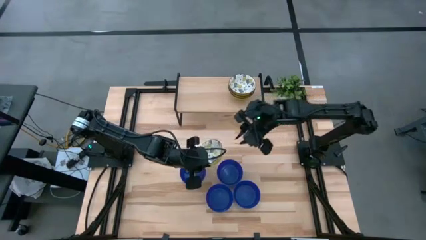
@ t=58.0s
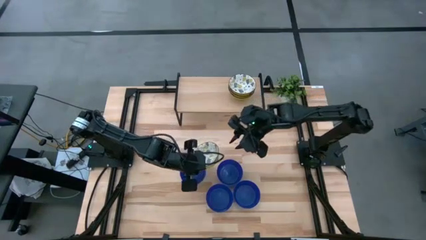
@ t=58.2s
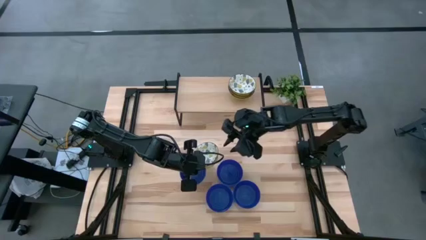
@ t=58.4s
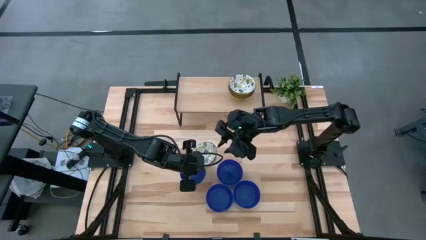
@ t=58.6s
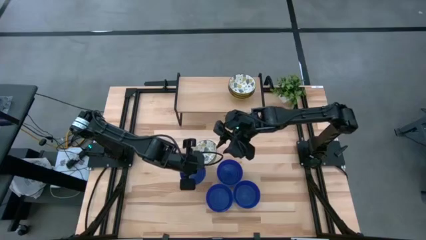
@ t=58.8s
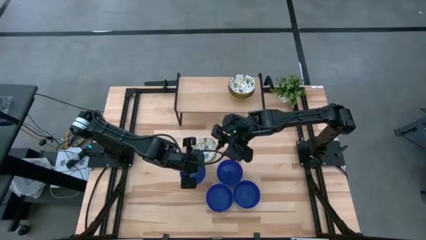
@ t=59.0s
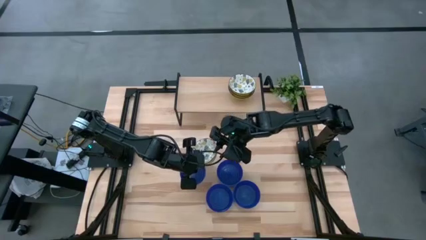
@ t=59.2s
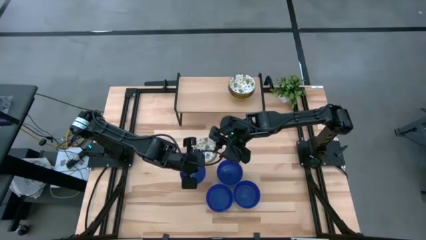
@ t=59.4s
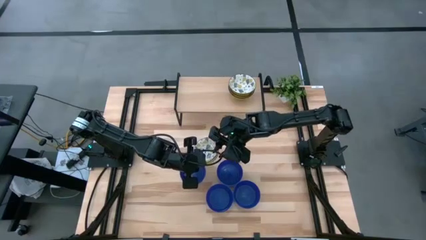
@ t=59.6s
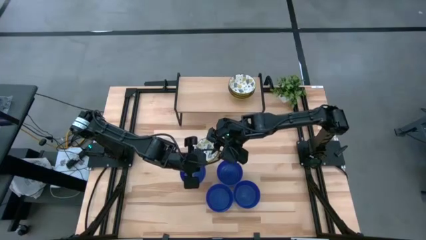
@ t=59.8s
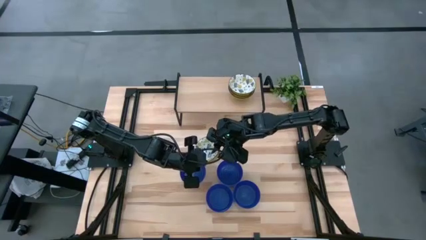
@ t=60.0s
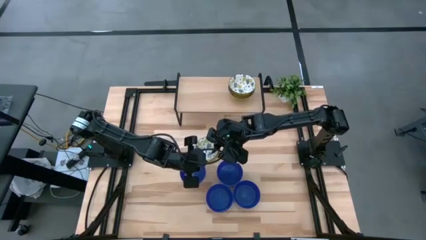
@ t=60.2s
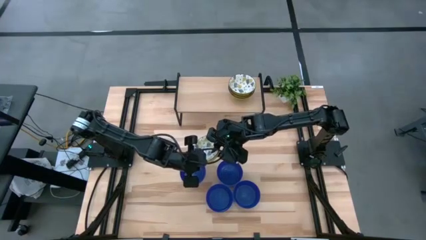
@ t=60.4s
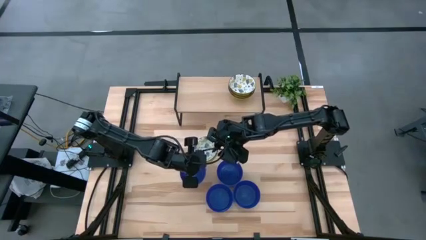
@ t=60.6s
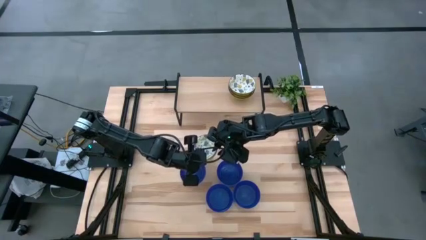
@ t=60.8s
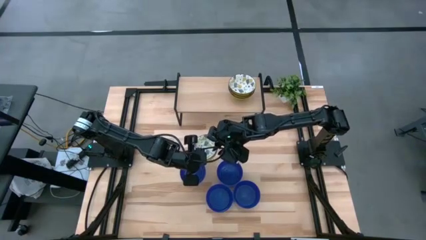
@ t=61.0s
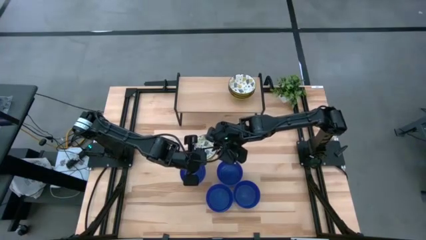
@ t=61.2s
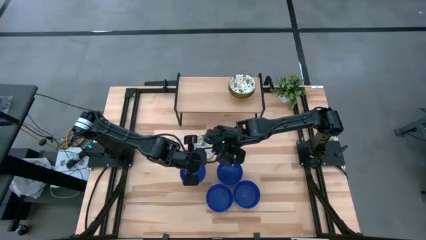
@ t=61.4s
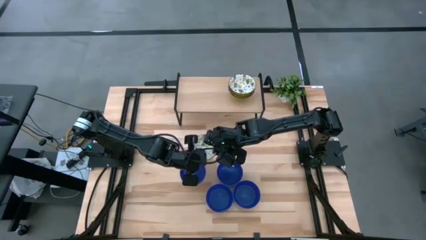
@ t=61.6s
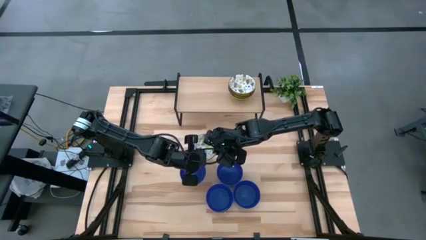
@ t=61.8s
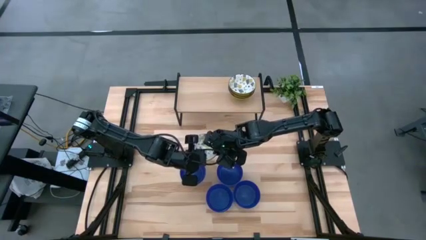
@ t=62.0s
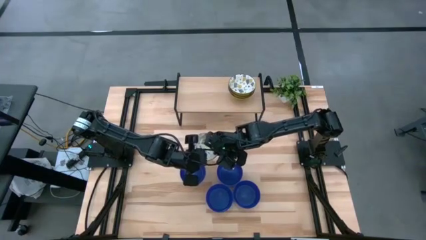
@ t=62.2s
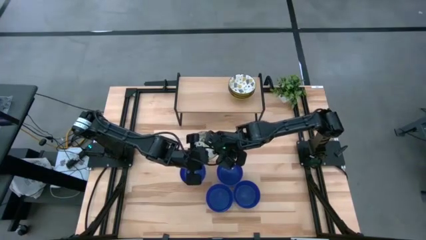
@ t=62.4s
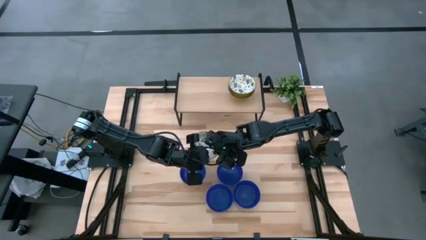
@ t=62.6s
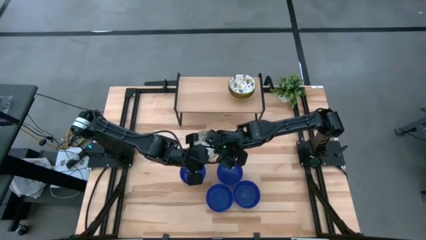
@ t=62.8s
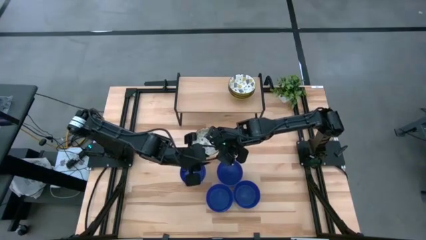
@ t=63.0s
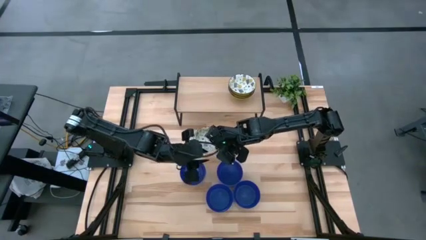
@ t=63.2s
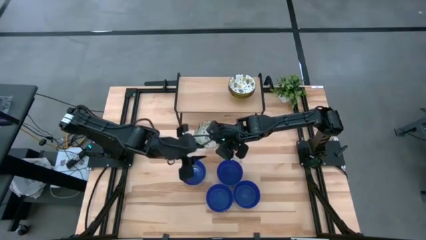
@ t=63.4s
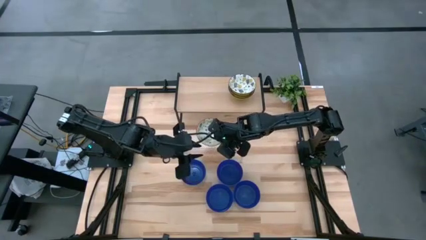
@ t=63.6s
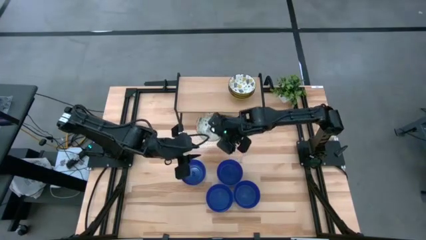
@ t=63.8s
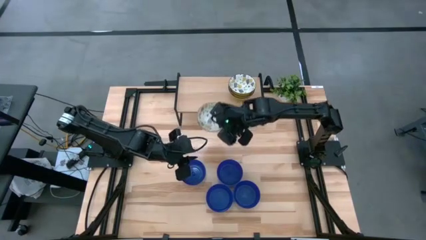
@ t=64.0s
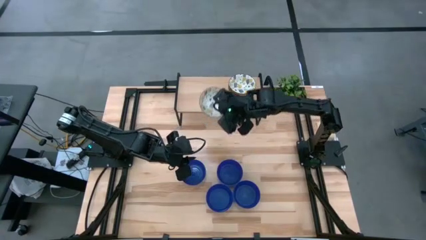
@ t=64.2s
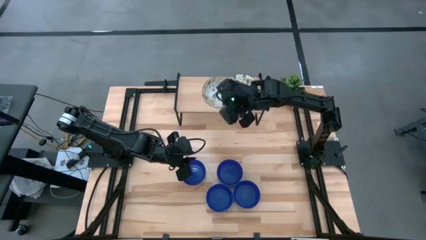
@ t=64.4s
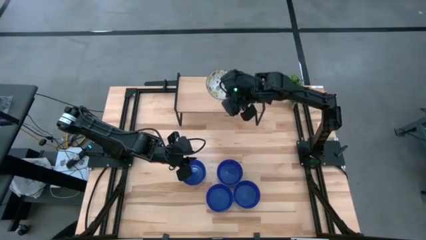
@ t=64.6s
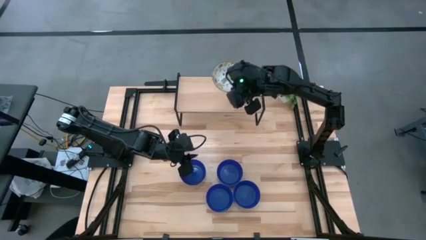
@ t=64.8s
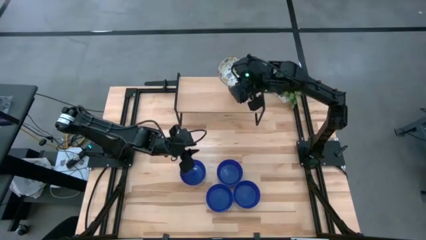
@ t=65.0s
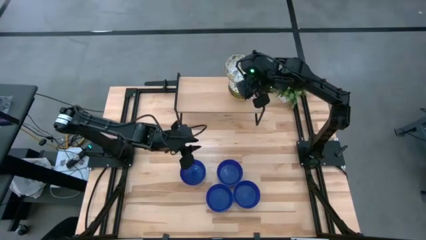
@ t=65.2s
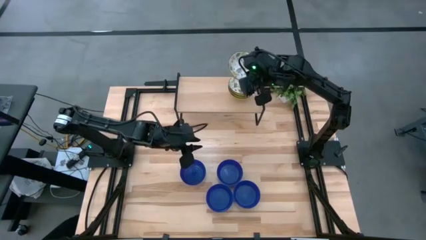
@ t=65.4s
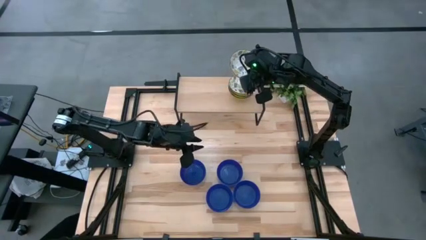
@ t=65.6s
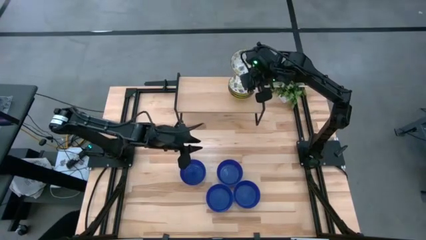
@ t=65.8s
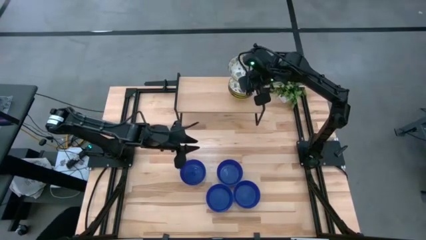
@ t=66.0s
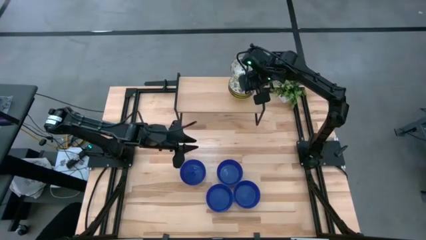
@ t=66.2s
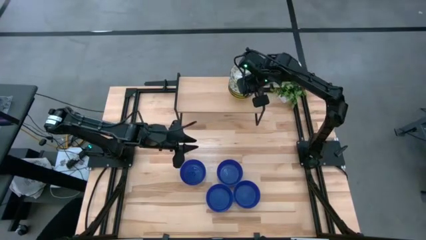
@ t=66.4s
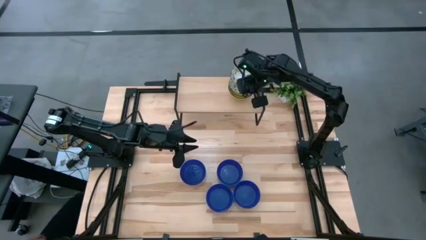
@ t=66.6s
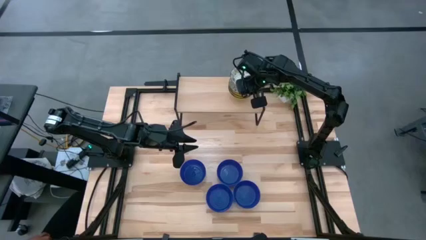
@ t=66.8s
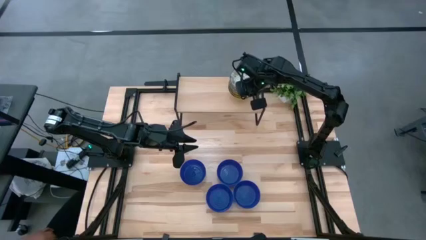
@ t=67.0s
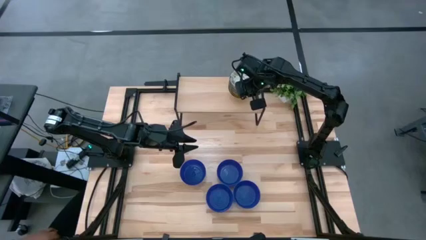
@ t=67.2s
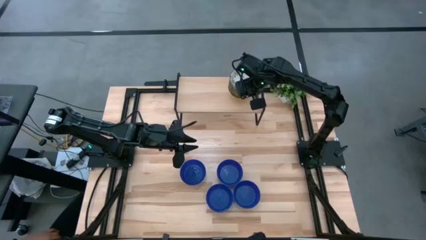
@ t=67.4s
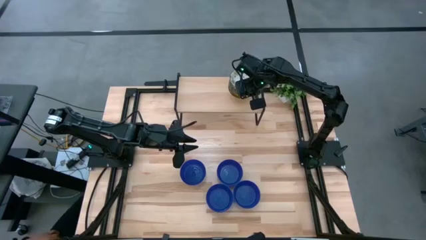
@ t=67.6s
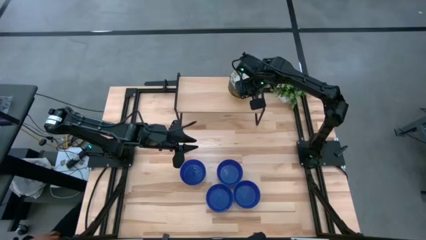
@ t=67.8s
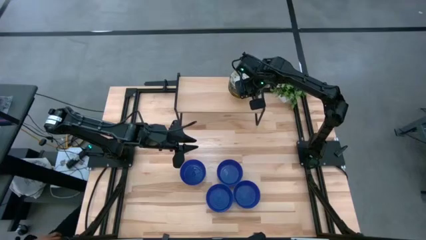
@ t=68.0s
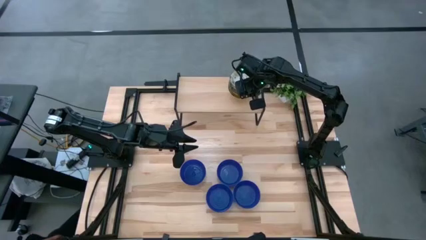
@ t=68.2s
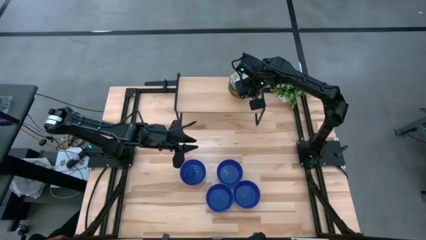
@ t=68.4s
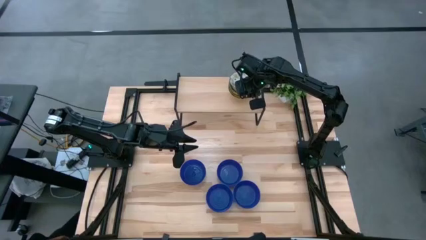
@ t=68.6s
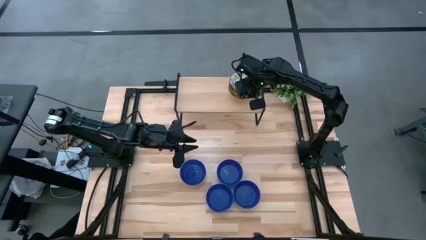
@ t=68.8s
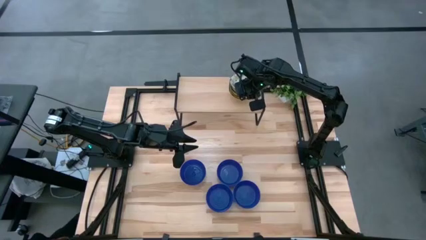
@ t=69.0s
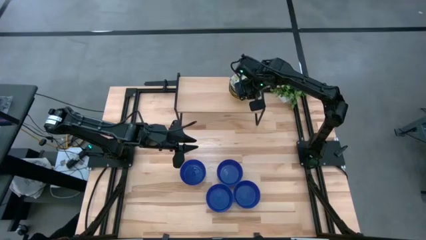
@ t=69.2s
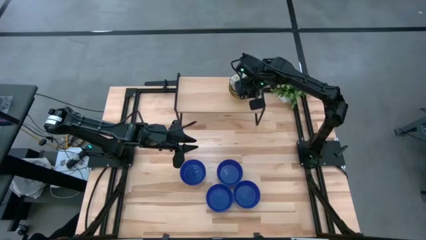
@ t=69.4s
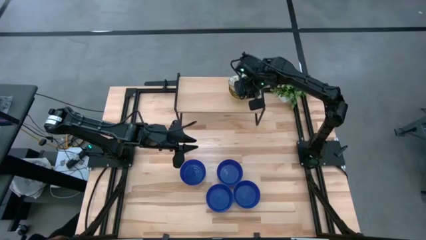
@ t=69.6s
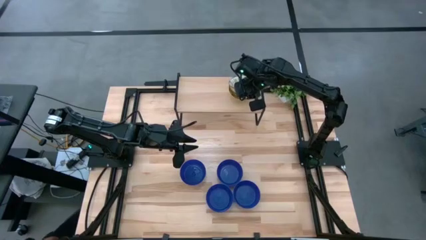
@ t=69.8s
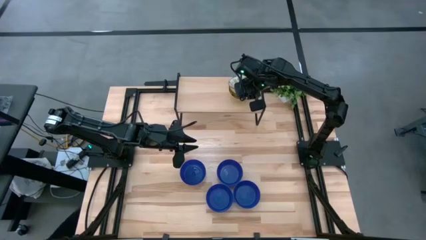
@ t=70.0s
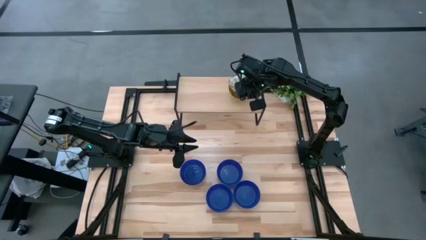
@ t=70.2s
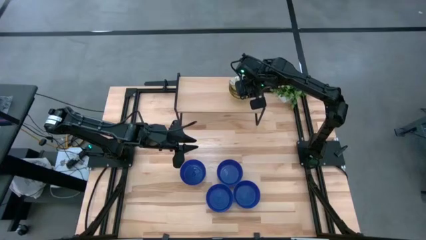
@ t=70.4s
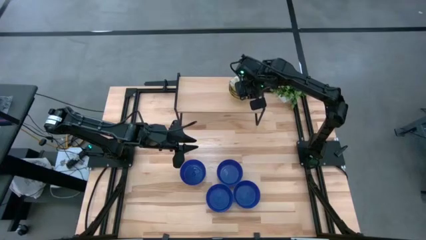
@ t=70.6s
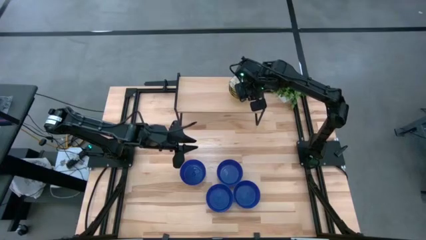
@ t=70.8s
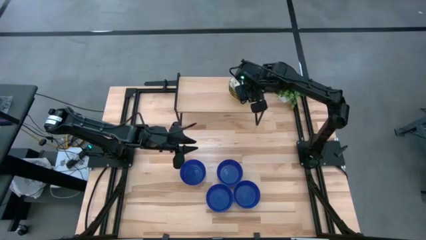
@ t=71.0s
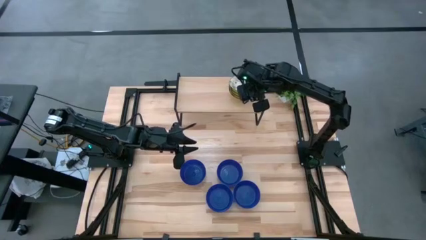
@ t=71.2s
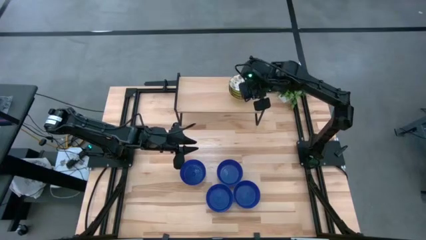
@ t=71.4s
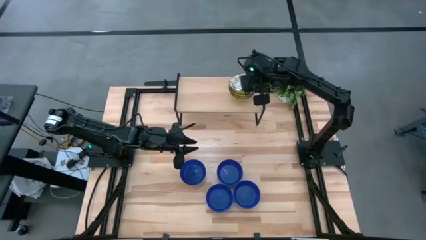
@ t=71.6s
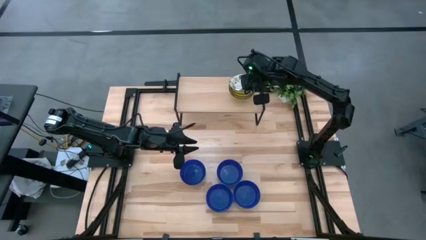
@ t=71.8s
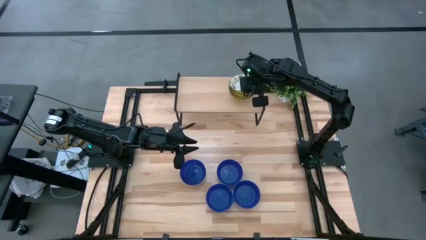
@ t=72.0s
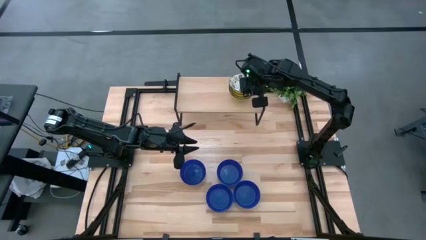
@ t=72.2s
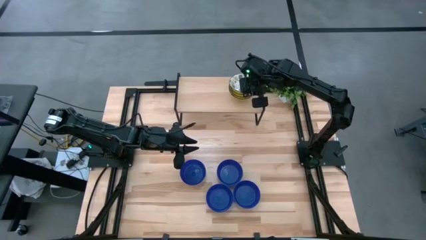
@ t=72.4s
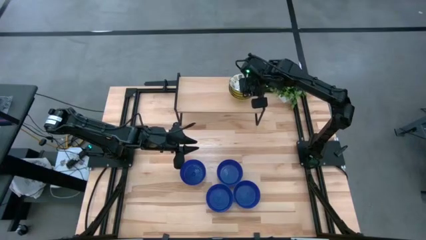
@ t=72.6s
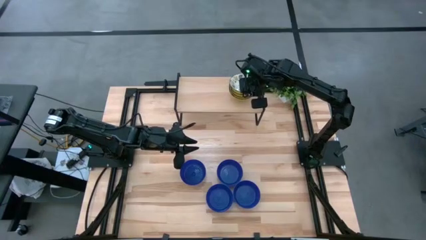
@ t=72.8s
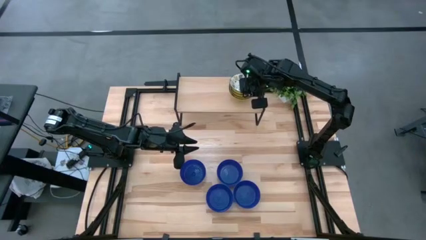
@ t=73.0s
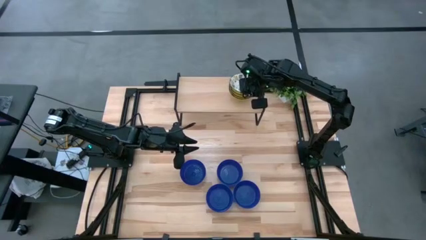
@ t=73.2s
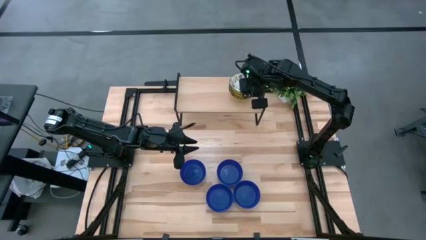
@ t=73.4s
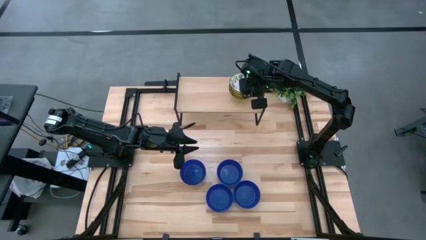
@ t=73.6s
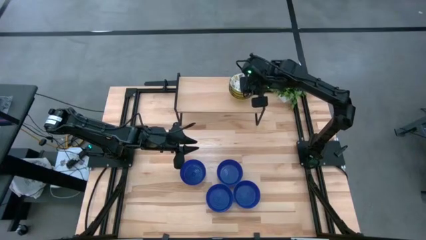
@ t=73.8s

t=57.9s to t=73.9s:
Task: Pick & Place Mini bowls
Stack the yellow bowl on top of the yellow bowl on the shelf
